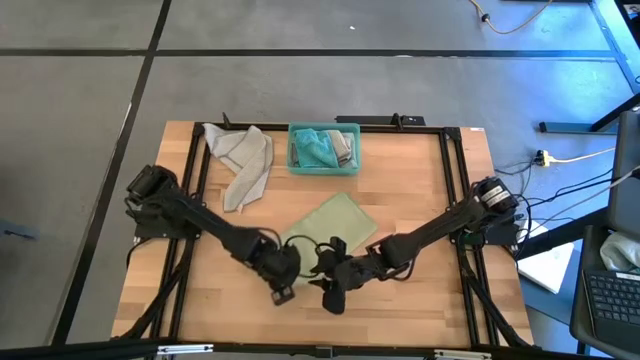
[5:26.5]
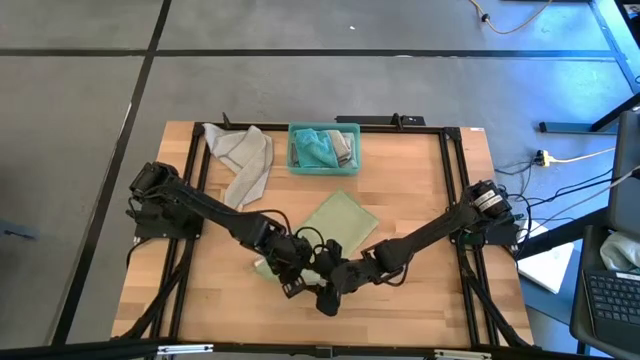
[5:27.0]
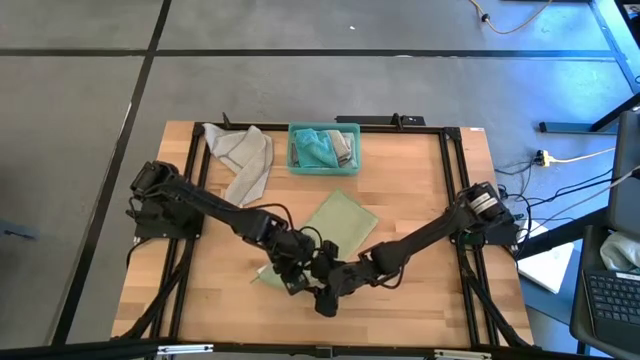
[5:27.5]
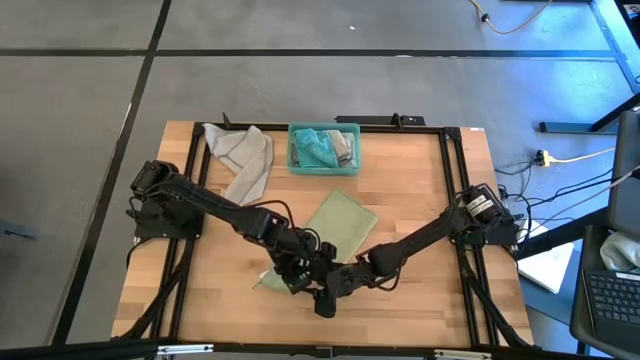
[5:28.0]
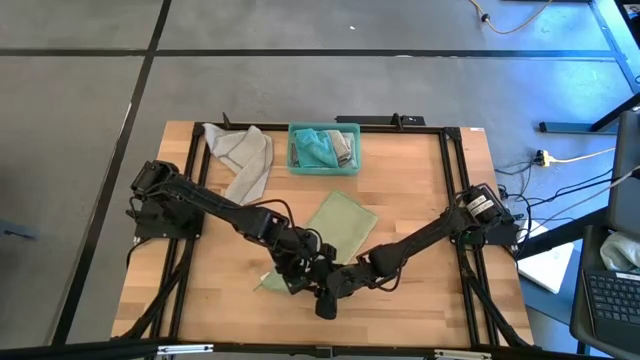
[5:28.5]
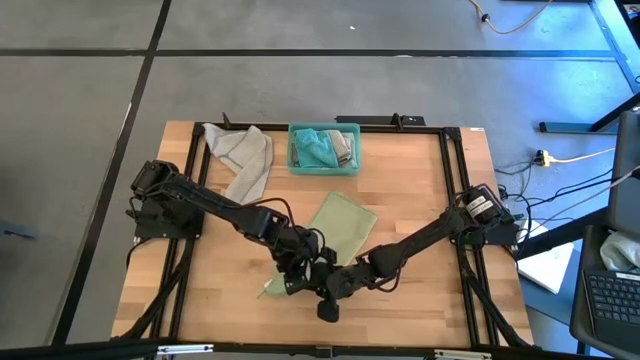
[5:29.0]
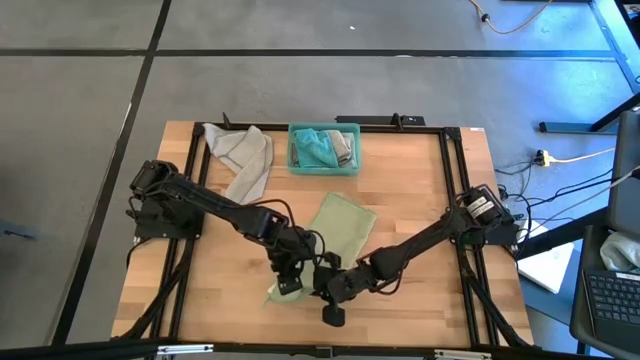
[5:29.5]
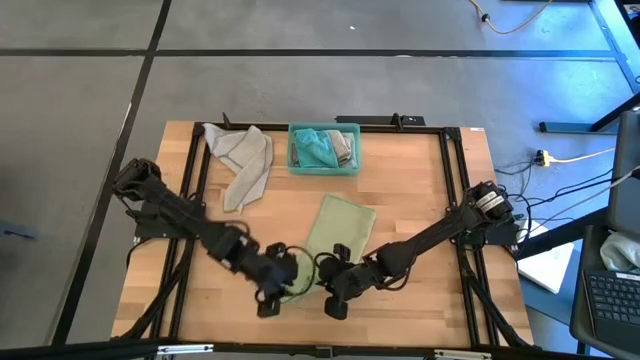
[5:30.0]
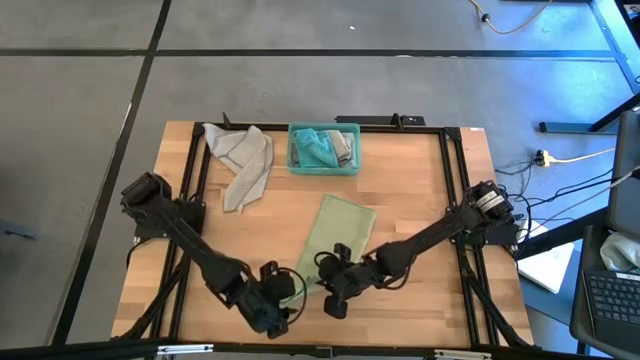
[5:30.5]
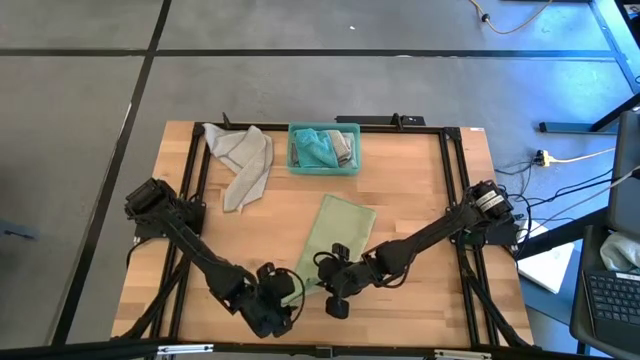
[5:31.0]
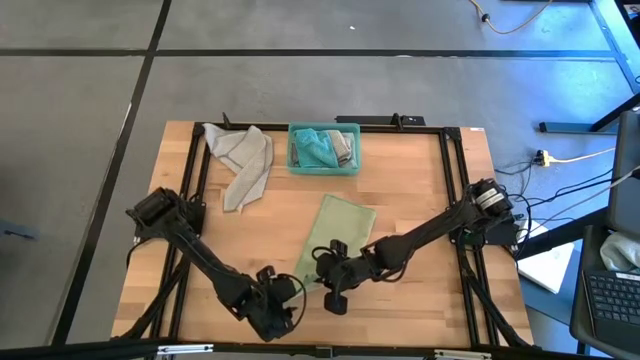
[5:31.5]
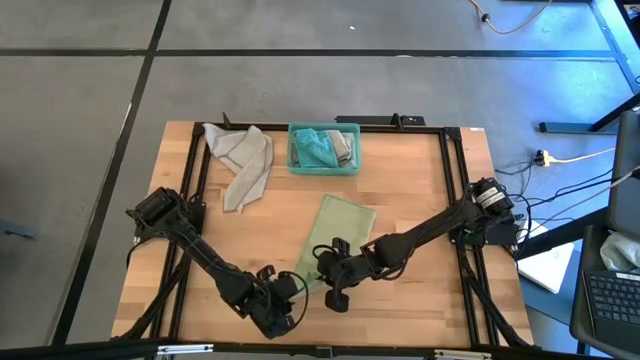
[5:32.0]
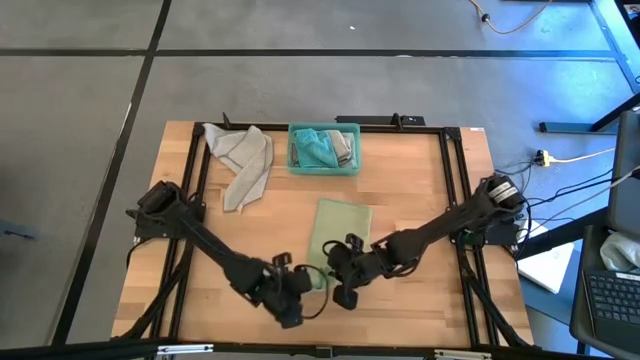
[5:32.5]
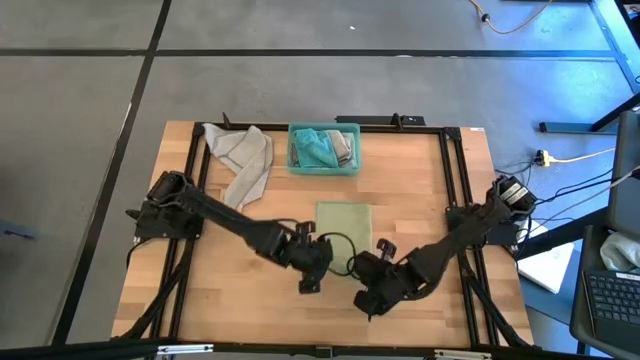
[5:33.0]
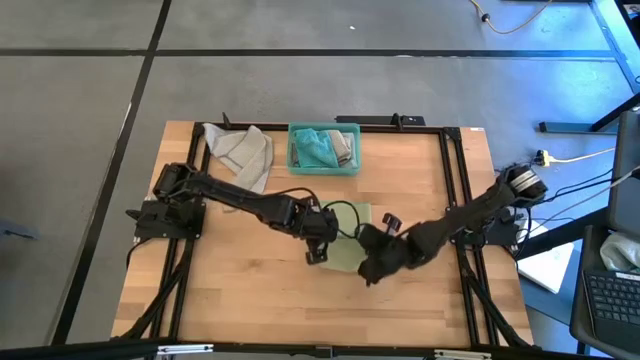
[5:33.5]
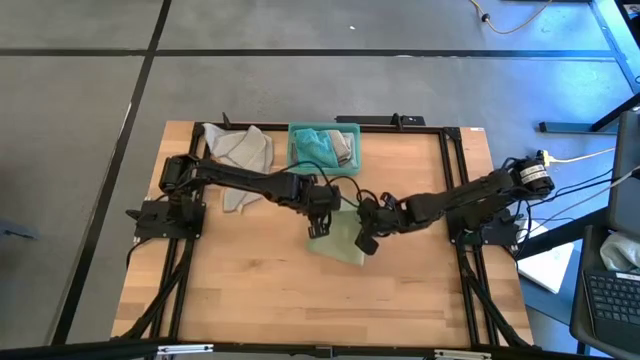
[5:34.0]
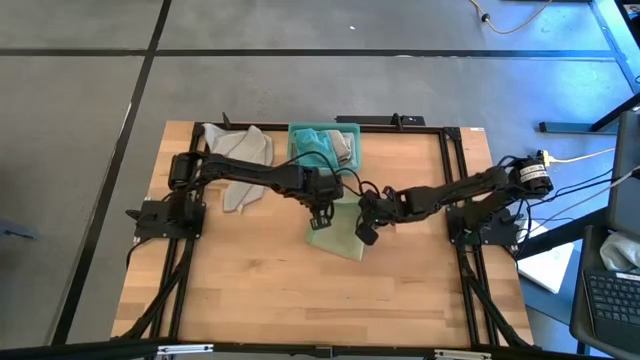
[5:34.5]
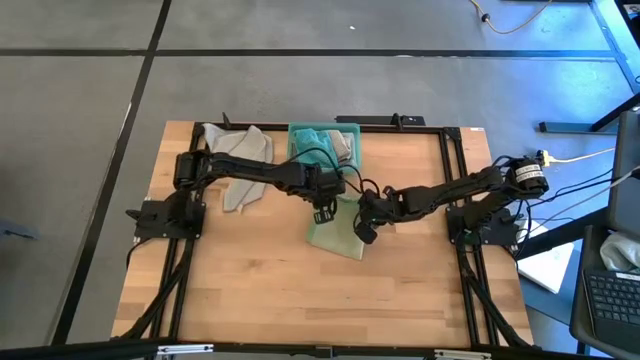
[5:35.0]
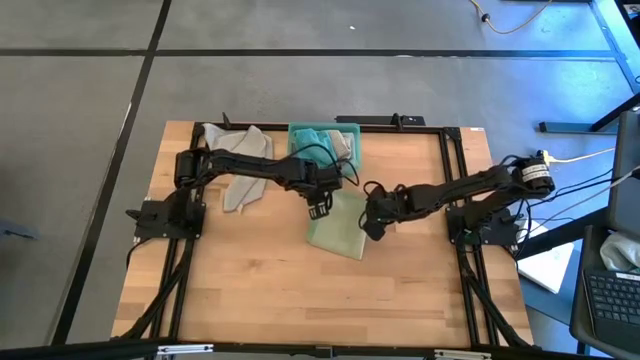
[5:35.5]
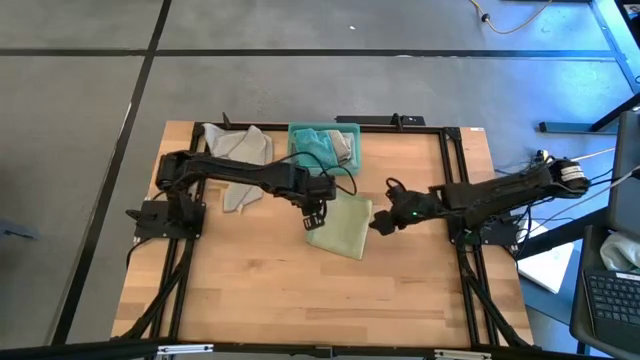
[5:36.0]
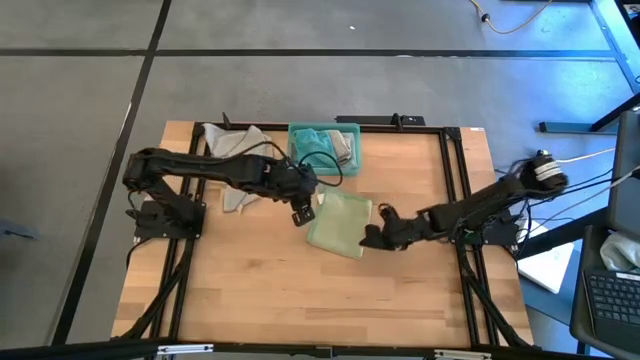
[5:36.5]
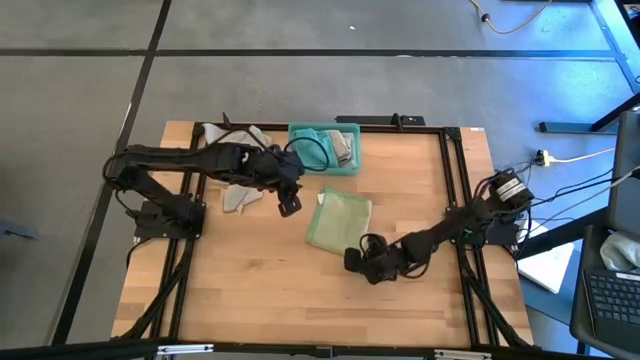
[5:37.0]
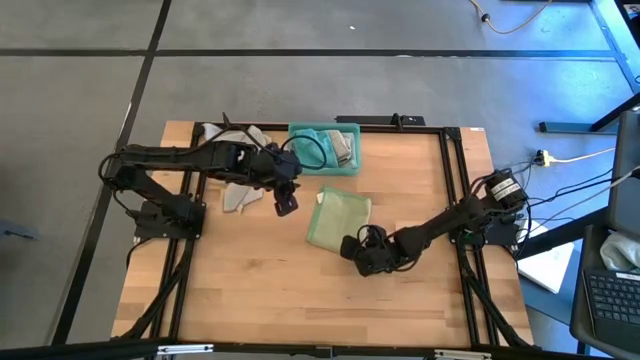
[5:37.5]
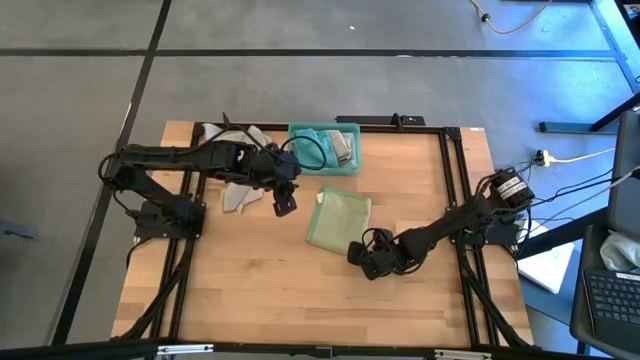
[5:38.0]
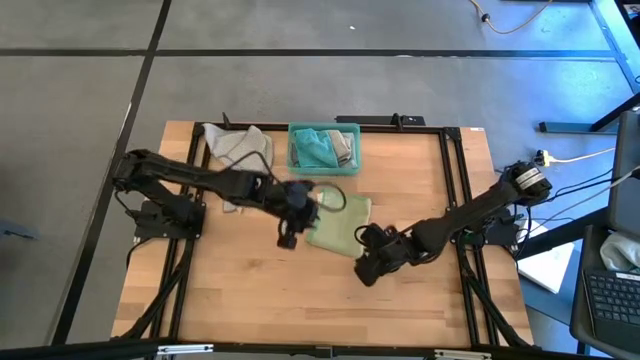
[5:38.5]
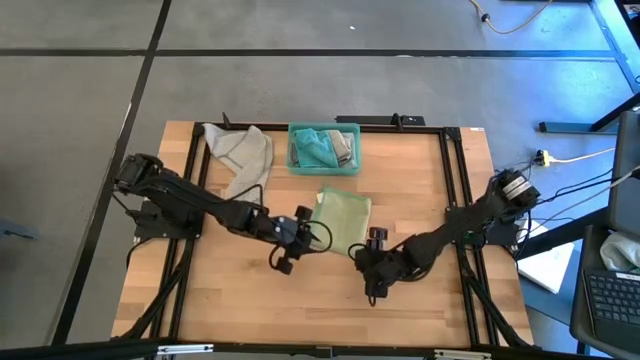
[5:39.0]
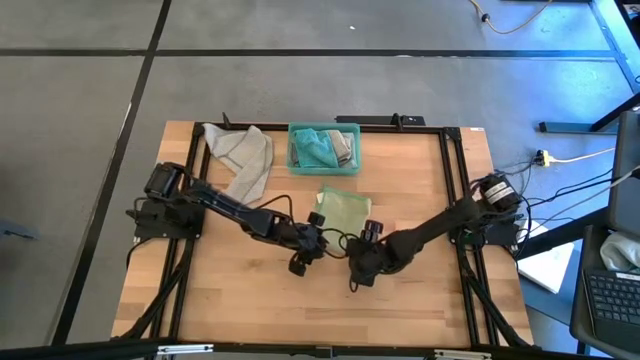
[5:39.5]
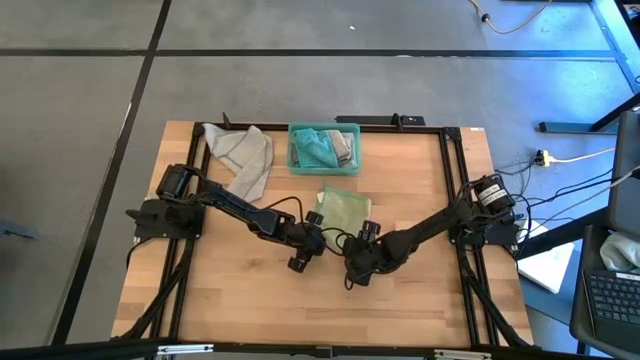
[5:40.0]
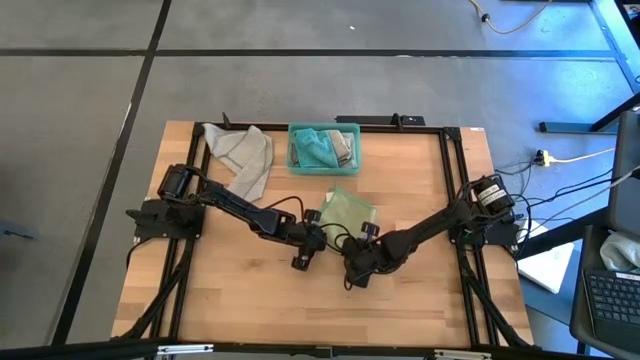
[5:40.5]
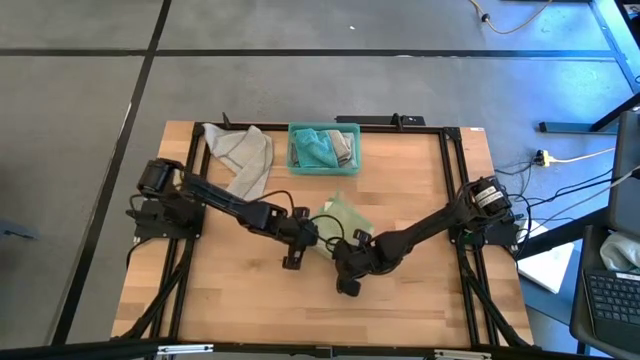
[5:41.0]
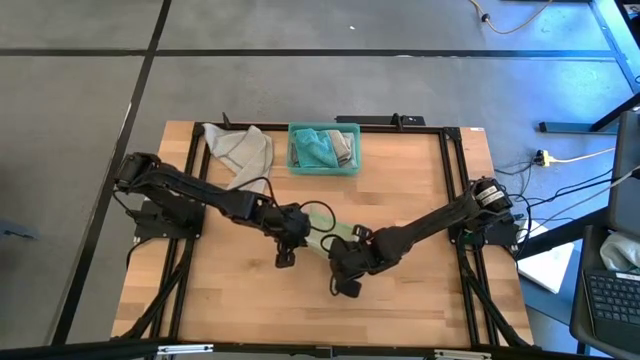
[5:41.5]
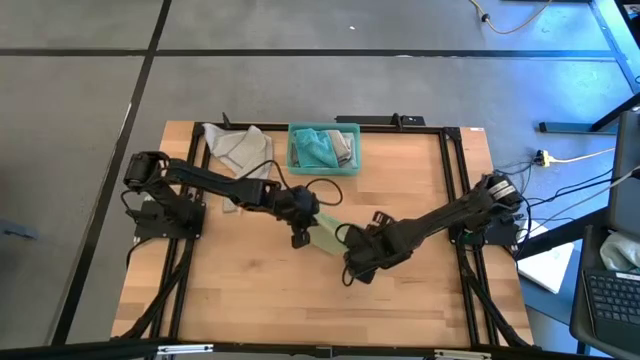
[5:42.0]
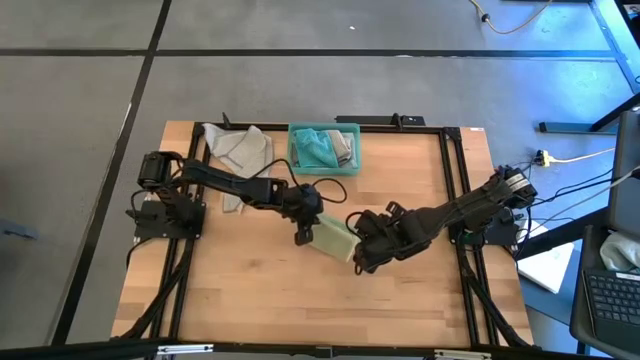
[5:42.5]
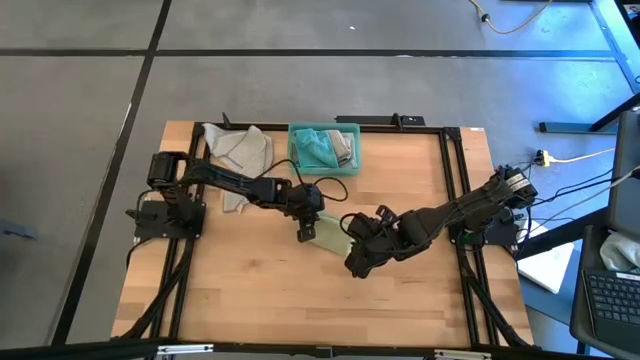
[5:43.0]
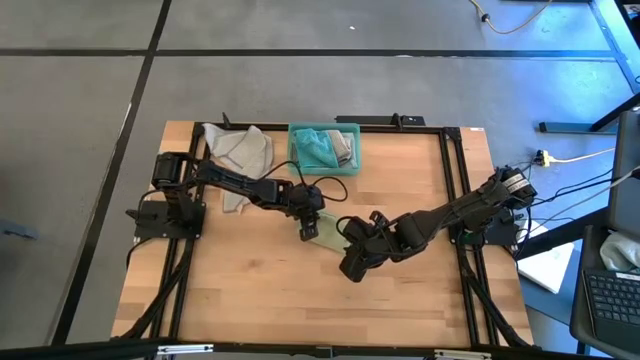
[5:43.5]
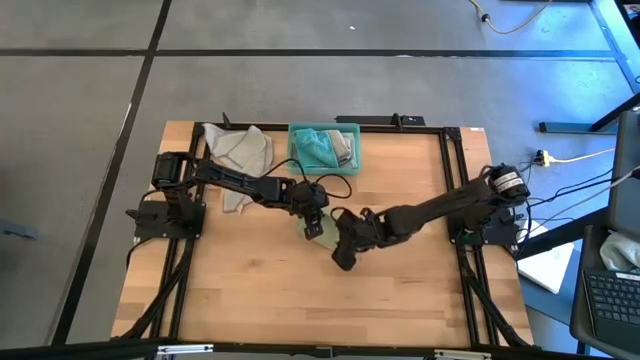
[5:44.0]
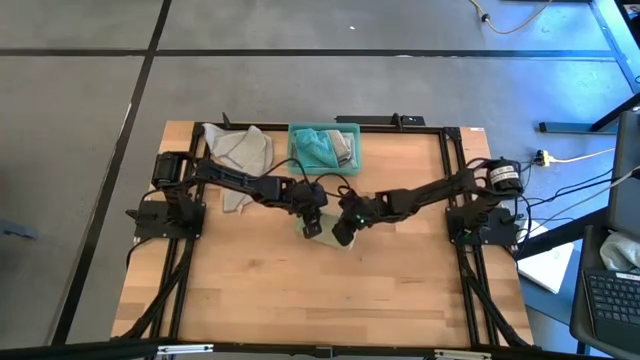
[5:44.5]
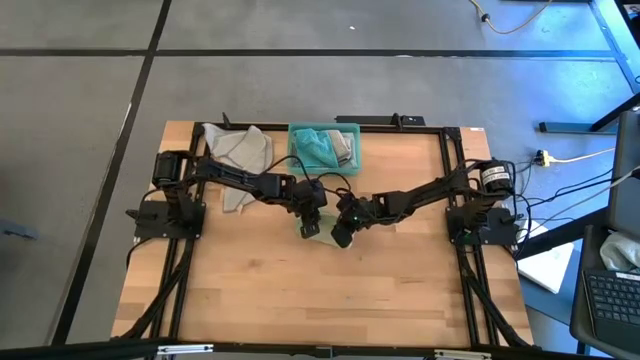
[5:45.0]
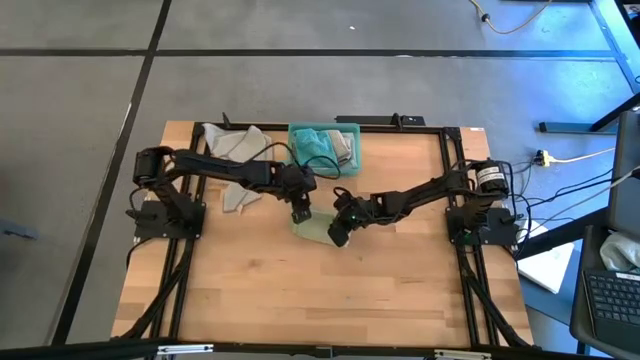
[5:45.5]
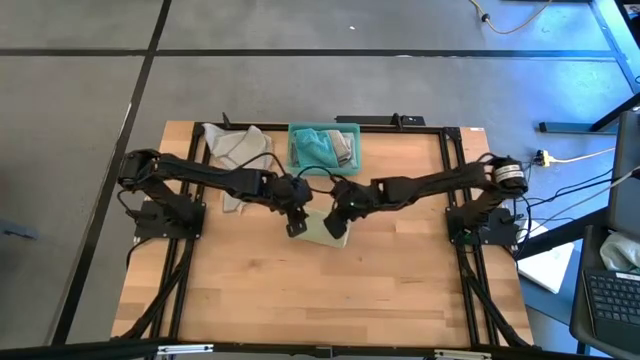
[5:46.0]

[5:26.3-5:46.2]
Task: Fold microfiber towels
Fold the green towel
